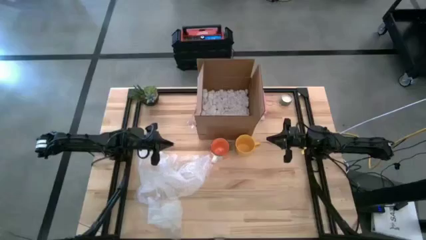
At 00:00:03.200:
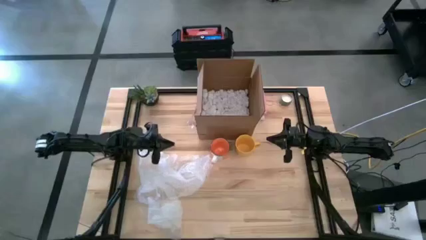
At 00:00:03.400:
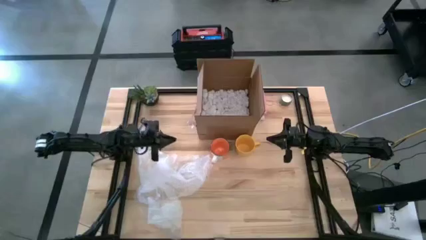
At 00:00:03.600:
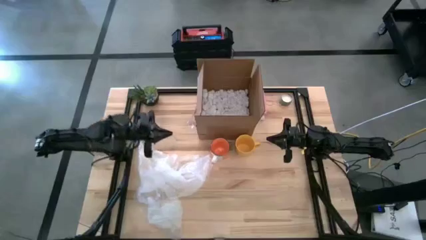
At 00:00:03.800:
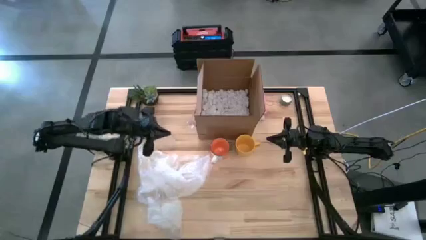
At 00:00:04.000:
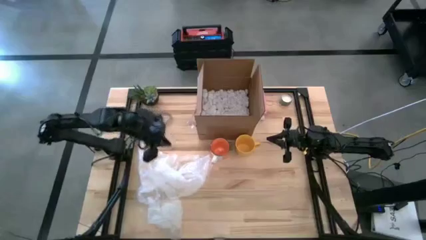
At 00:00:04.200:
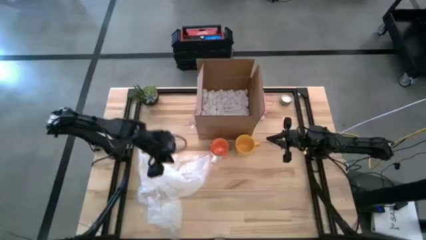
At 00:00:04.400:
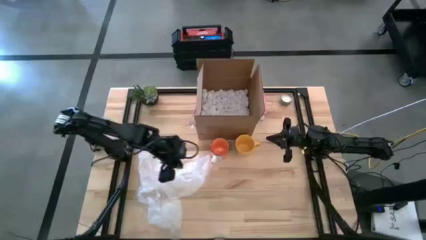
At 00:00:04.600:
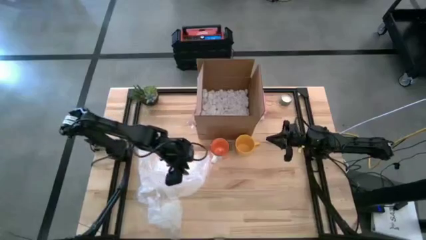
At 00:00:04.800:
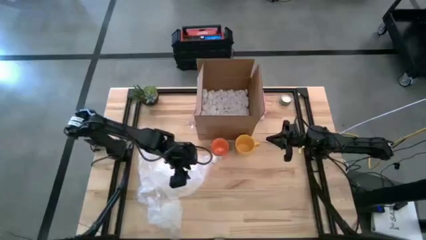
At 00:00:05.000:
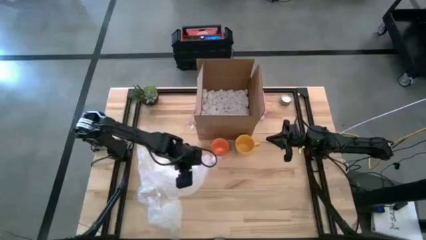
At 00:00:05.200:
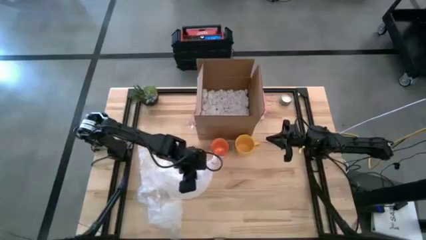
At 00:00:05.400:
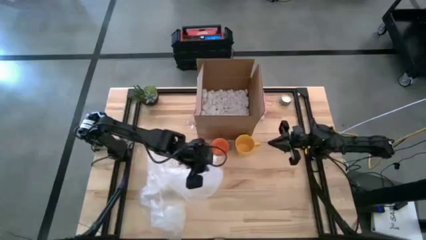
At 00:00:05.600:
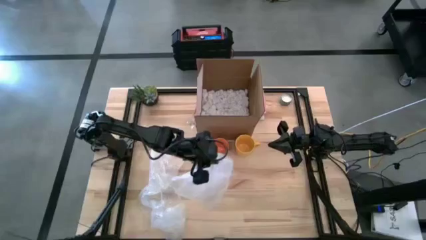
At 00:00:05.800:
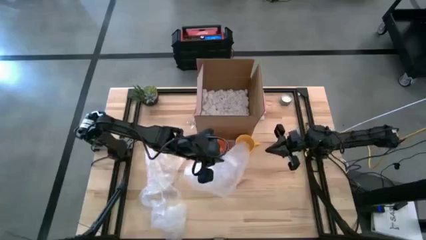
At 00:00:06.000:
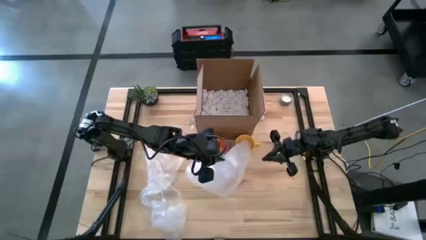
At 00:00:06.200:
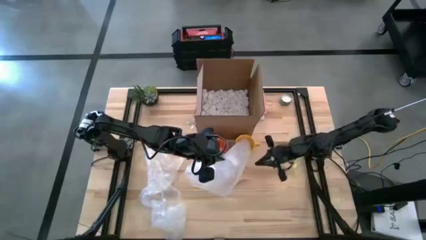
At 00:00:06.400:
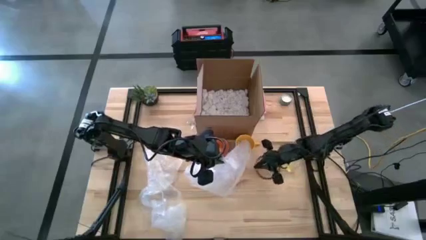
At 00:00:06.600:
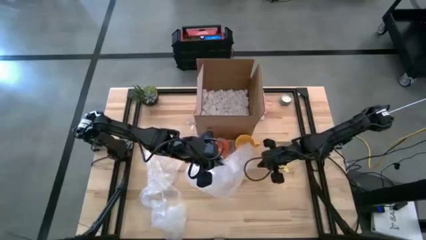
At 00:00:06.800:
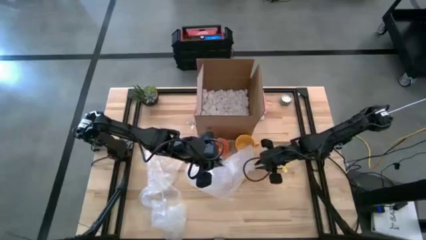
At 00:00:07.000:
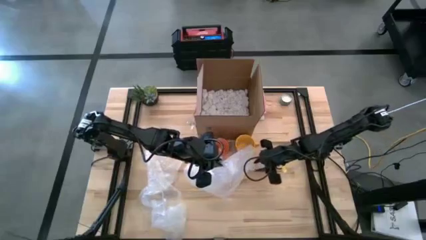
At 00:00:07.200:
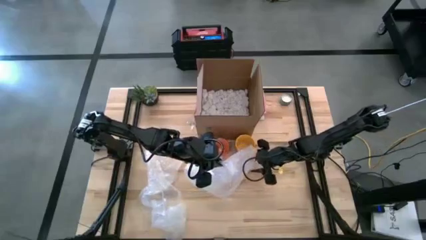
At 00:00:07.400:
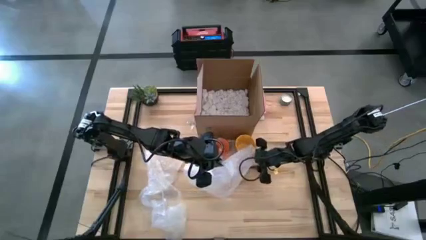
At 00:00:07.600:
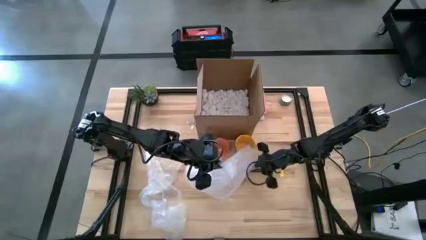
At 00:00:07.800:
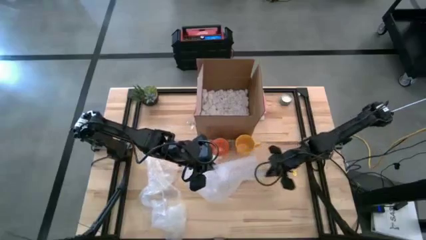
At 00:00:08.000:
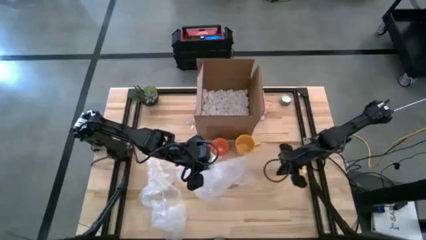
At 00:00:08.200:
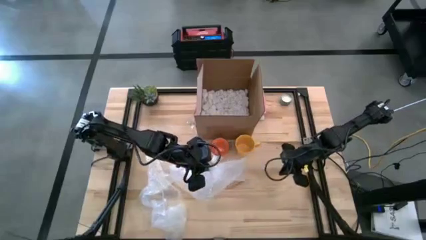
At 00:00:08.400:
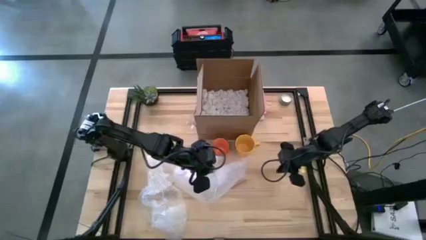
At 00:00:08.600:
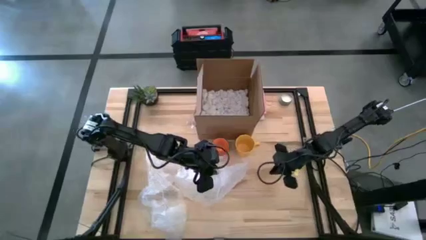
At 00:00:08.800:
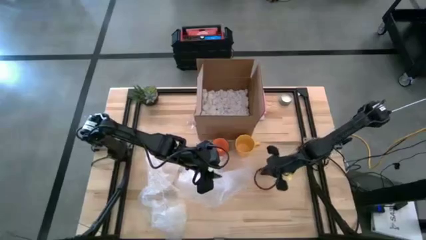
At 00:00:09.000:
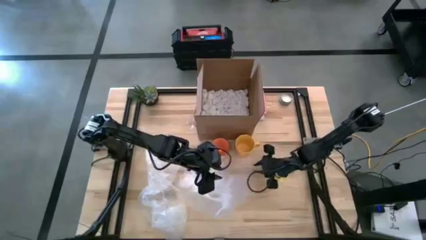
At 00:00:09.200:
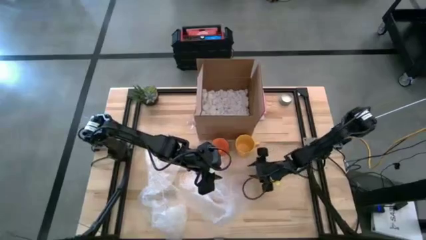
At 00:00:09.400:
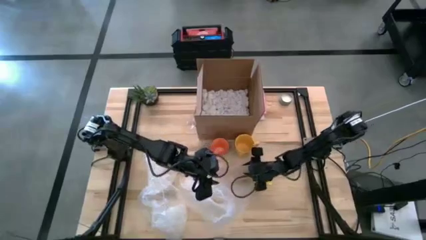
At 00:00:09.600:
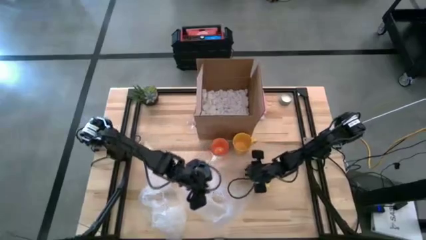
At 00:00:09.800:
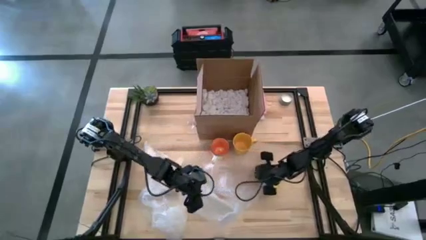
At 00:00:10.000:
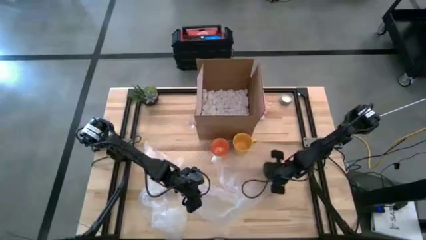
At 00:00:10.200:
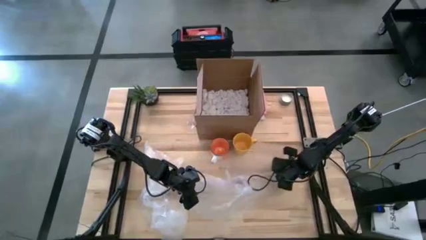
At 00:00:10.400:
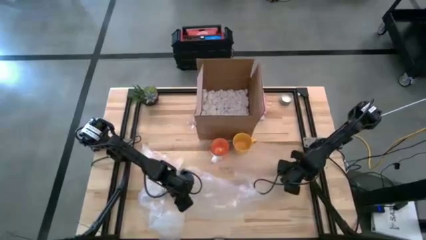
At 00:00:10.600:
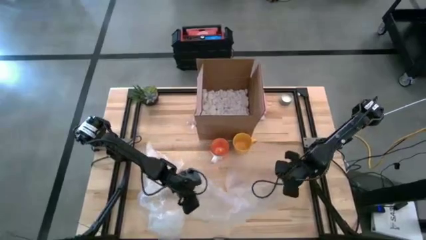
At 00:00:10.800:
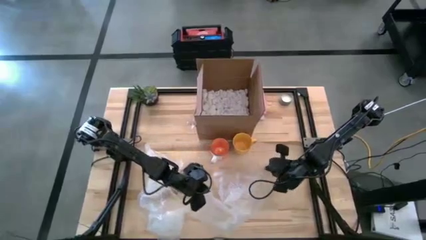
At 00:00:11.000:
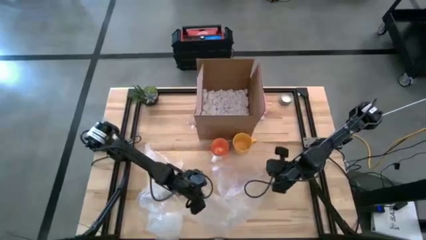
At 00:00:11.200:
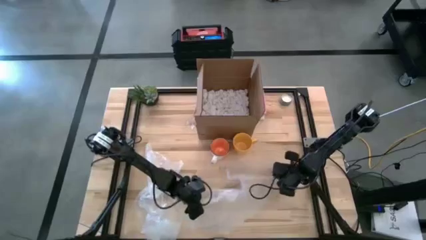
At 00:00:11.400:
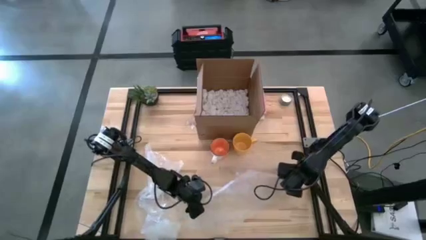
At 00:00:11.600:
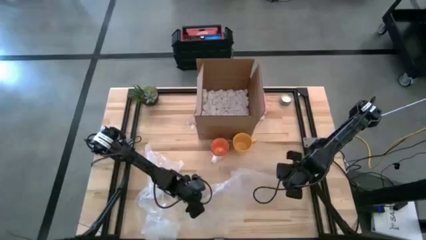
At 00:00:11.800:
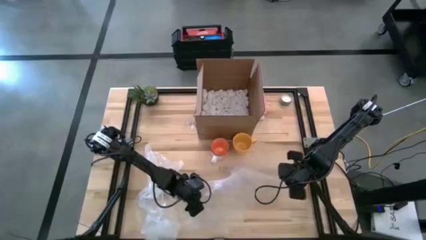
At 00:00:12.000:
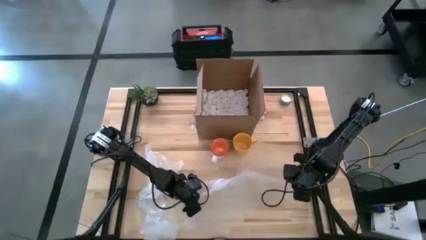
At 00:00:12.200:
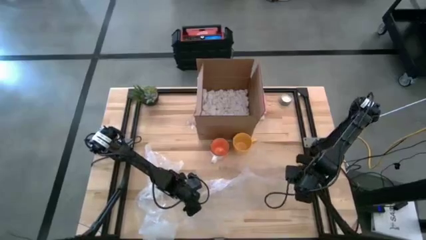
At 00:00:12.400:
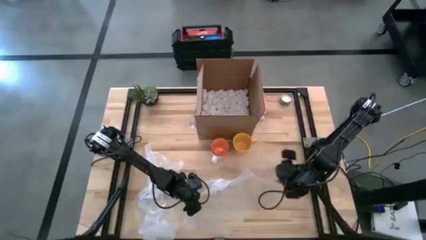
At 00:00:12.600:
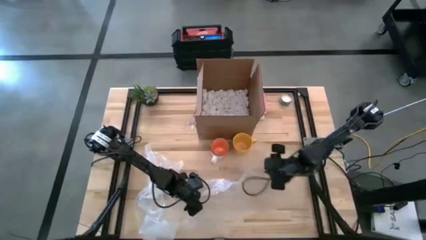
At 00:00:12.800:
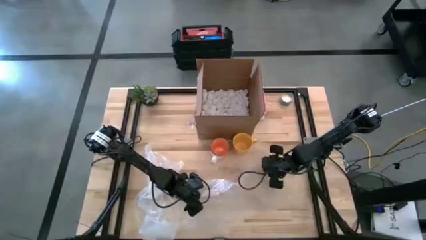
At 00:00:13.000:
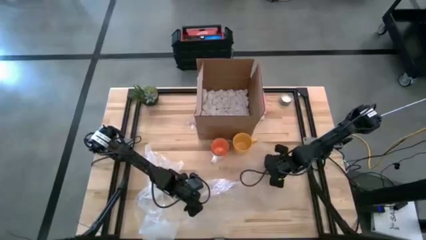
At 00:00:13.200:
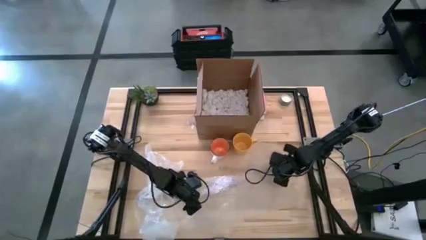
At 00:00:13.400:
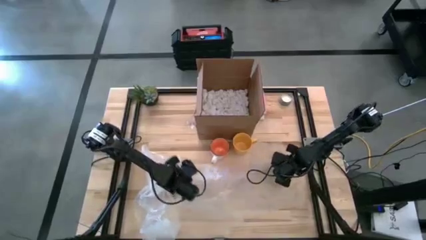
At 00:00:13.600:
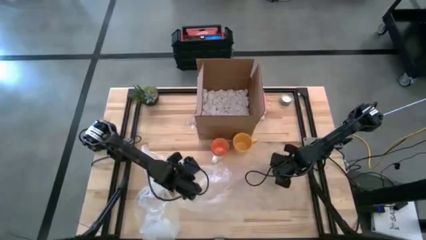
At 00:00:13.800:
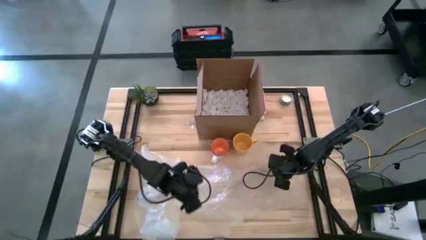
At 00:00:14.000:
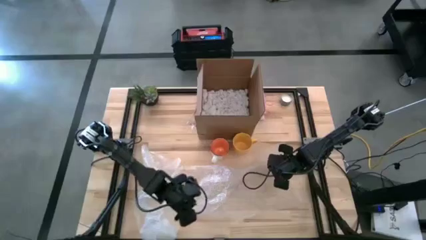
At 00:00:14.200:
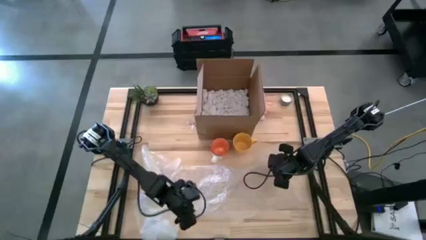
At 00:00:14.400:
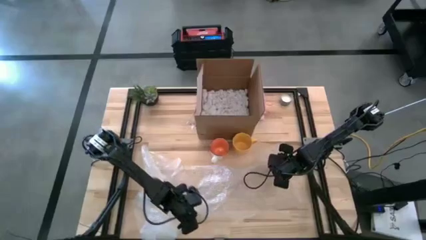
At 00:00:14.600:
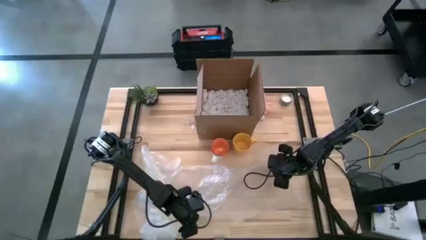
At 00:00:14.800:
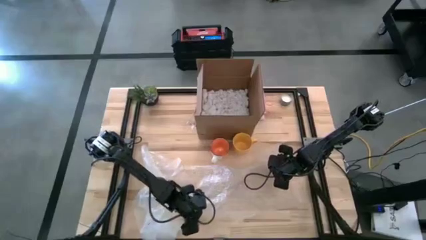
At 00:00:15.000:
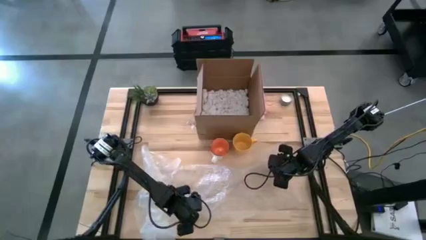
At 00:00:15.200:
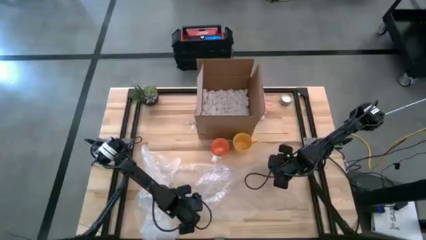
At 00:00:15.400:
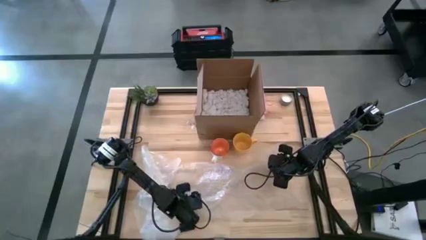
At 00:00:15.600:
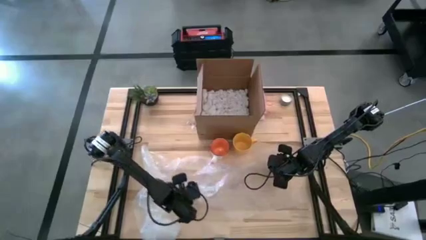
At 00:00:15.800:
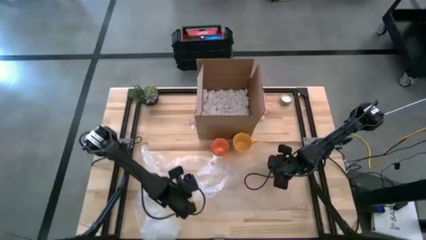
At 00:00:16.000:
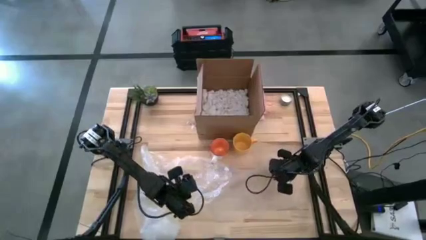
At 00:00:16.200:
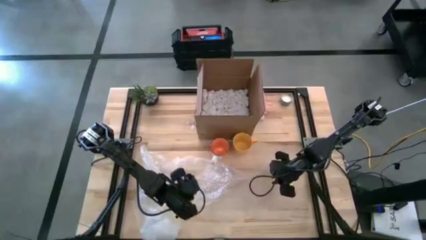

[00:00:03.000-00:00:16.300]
Task: wrap mug
Prepare the transparent bubble wrap
